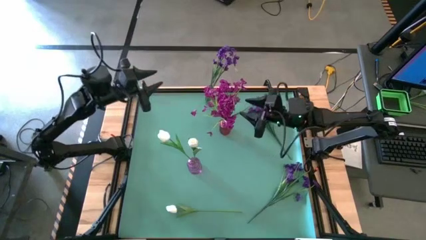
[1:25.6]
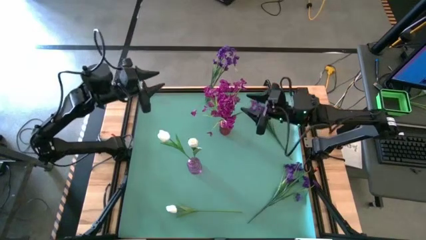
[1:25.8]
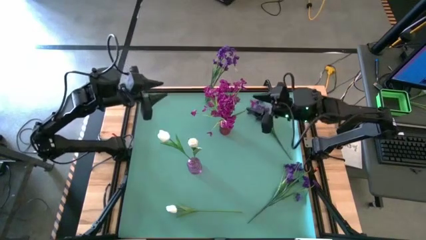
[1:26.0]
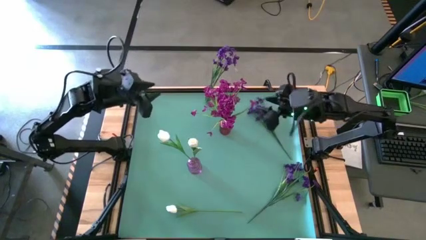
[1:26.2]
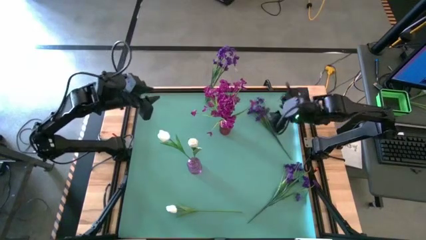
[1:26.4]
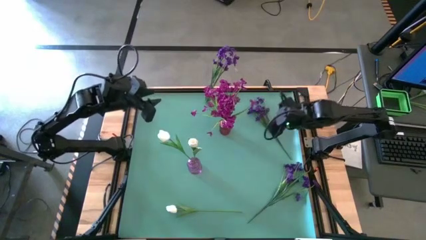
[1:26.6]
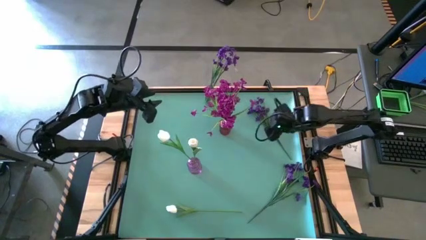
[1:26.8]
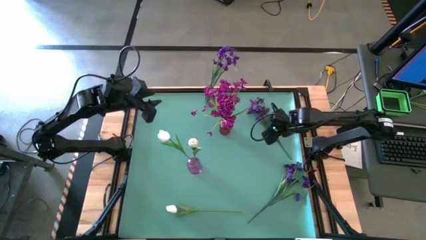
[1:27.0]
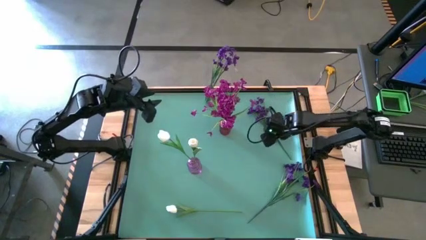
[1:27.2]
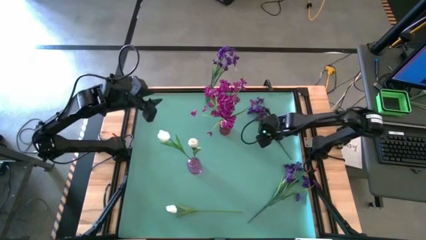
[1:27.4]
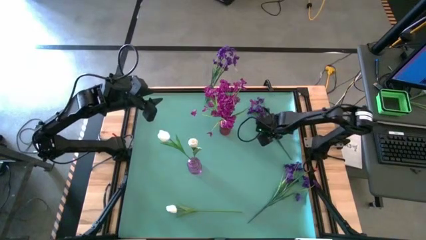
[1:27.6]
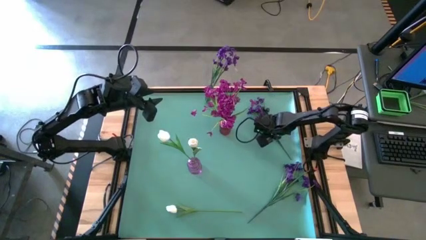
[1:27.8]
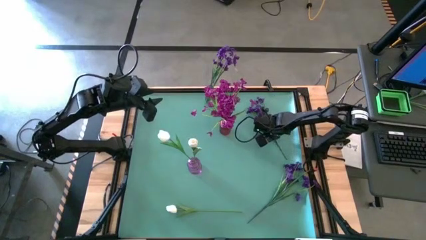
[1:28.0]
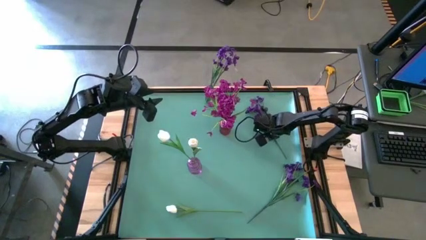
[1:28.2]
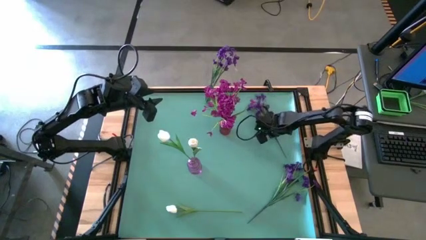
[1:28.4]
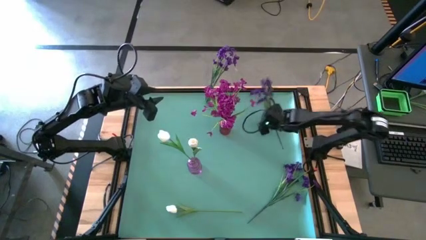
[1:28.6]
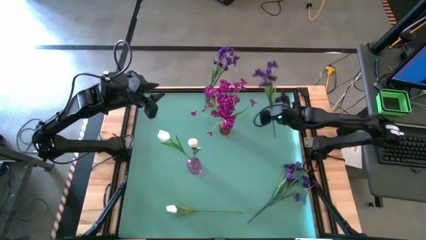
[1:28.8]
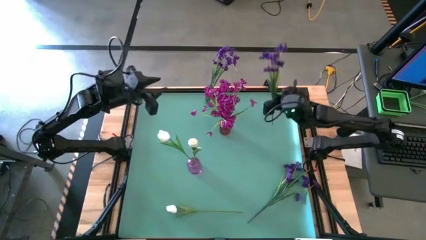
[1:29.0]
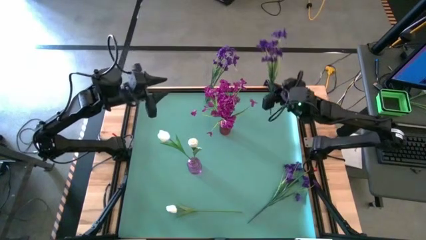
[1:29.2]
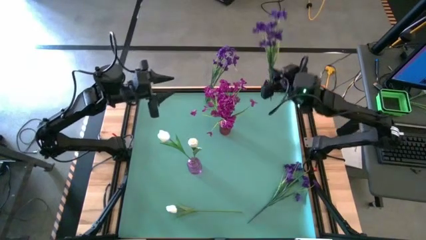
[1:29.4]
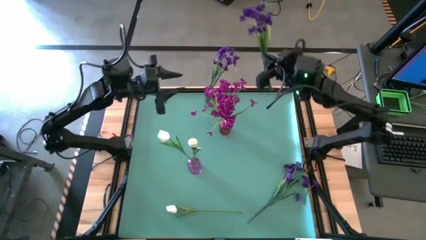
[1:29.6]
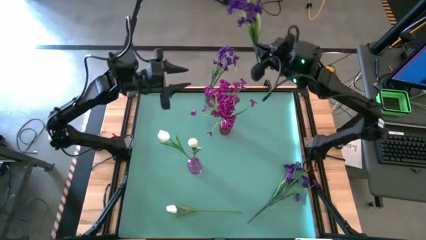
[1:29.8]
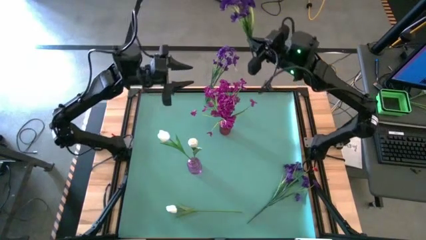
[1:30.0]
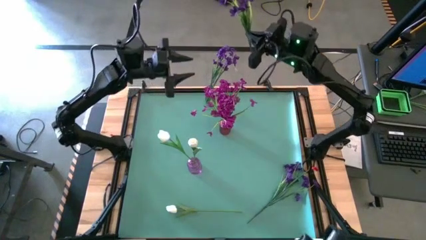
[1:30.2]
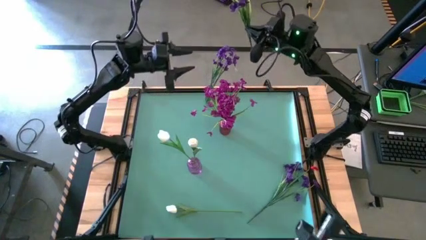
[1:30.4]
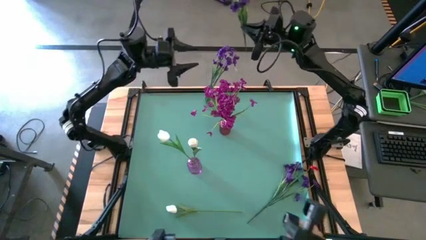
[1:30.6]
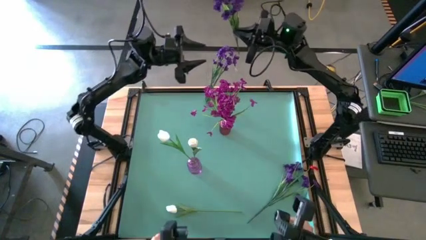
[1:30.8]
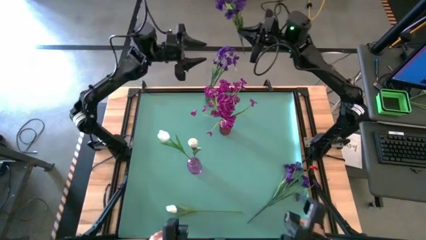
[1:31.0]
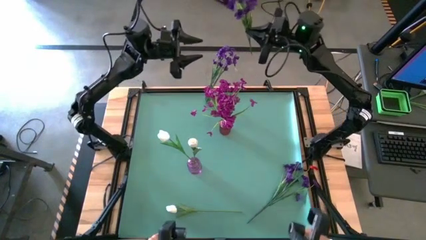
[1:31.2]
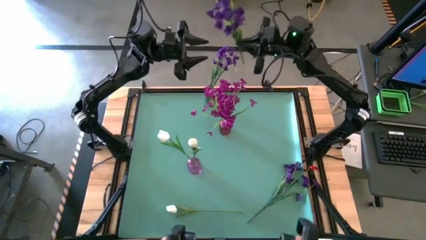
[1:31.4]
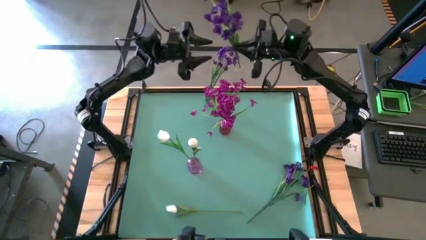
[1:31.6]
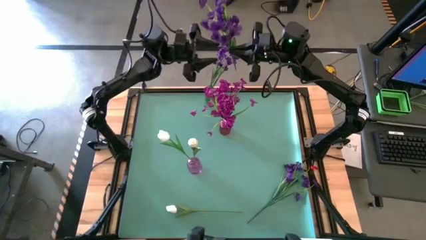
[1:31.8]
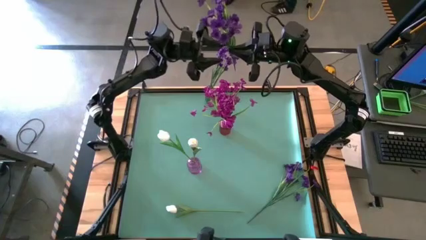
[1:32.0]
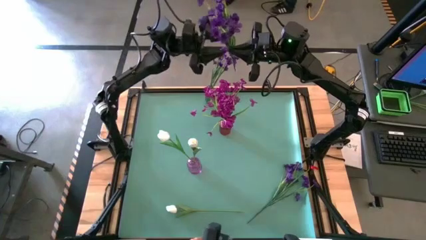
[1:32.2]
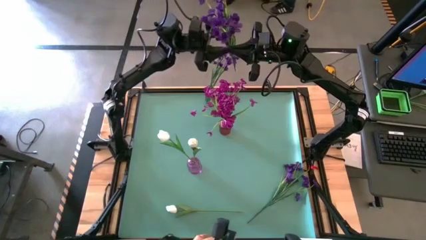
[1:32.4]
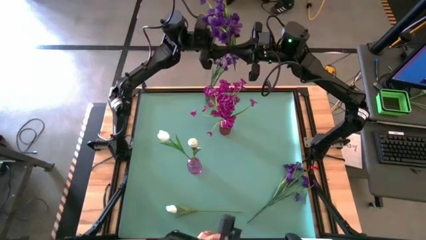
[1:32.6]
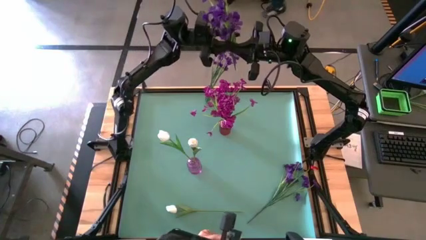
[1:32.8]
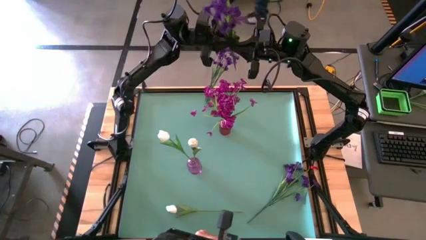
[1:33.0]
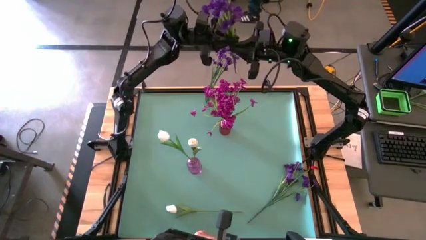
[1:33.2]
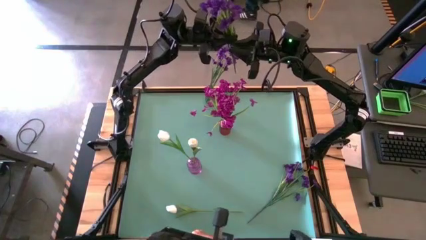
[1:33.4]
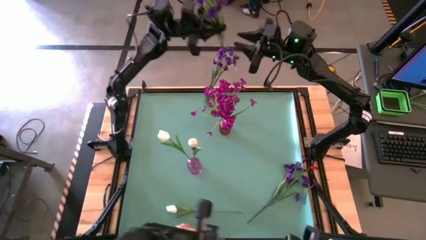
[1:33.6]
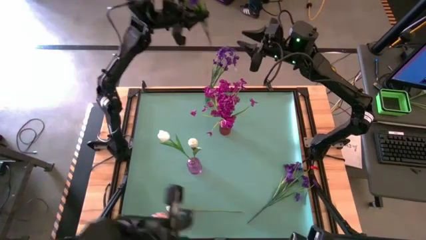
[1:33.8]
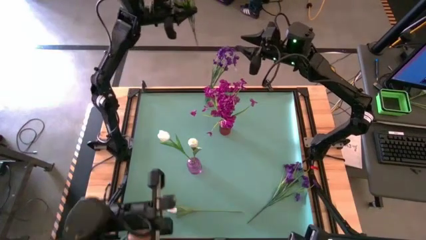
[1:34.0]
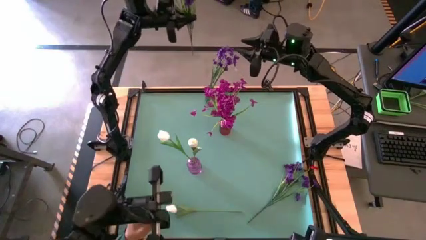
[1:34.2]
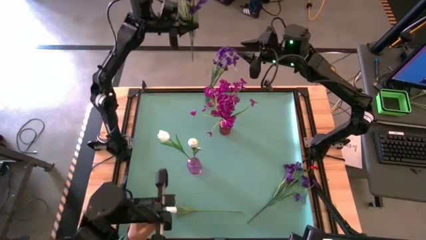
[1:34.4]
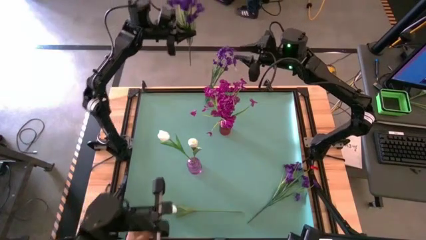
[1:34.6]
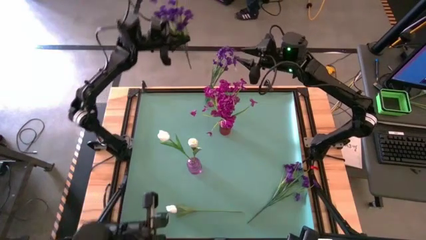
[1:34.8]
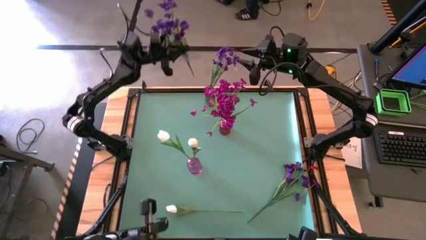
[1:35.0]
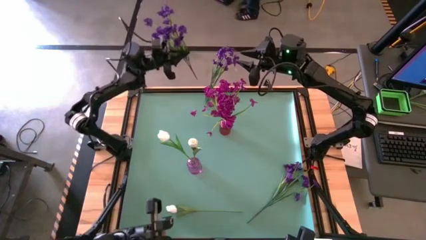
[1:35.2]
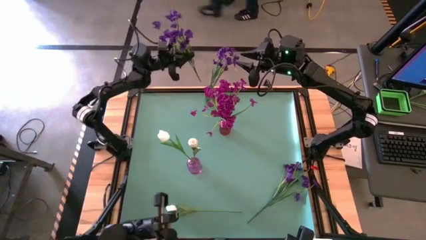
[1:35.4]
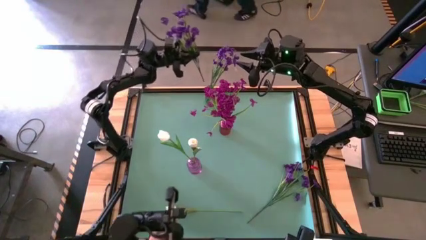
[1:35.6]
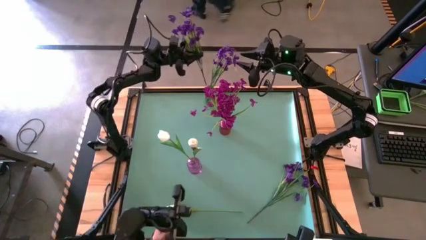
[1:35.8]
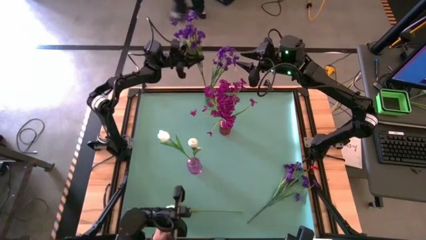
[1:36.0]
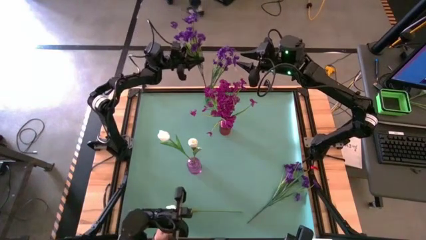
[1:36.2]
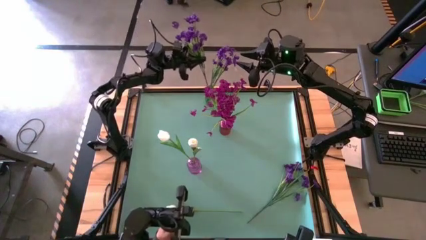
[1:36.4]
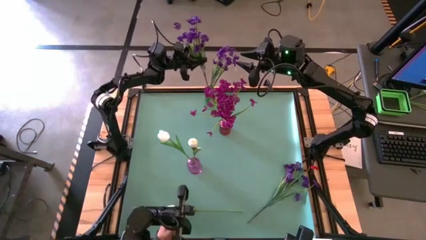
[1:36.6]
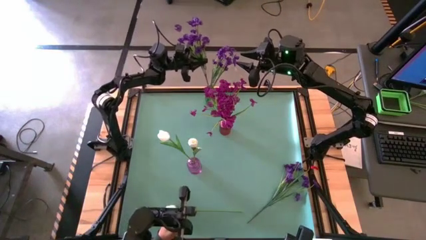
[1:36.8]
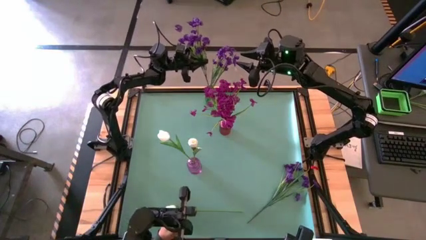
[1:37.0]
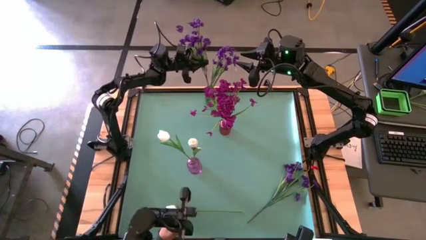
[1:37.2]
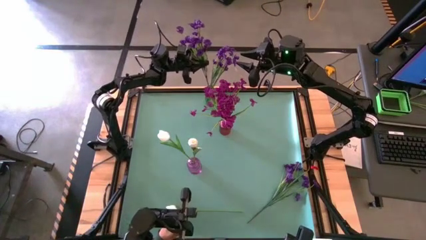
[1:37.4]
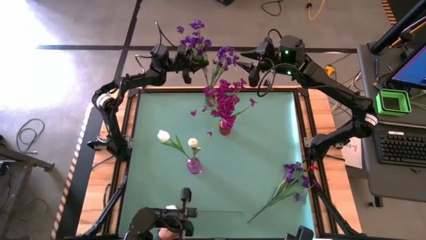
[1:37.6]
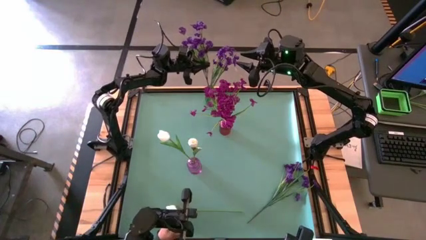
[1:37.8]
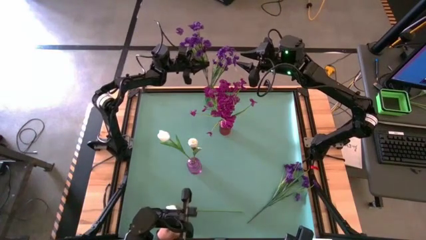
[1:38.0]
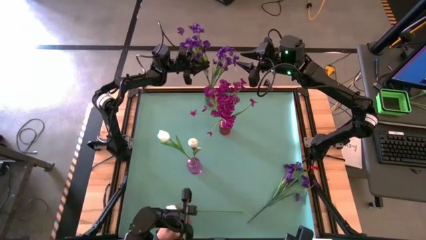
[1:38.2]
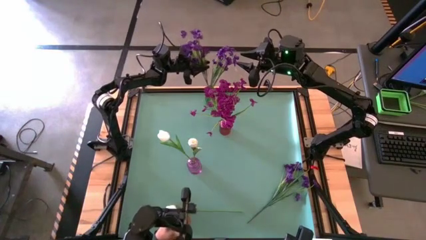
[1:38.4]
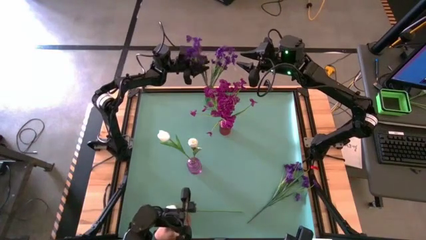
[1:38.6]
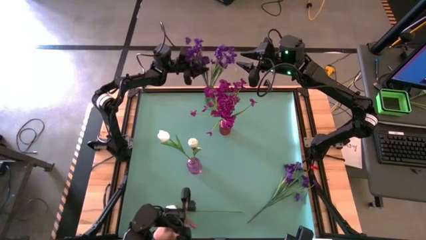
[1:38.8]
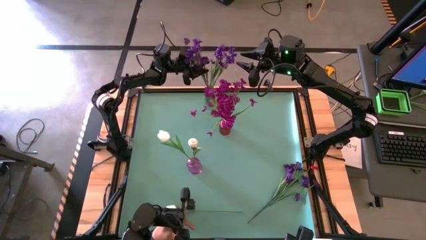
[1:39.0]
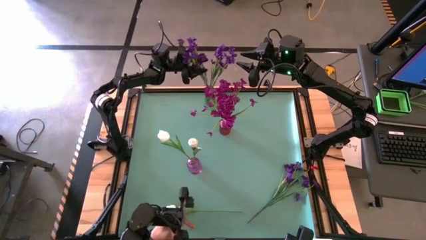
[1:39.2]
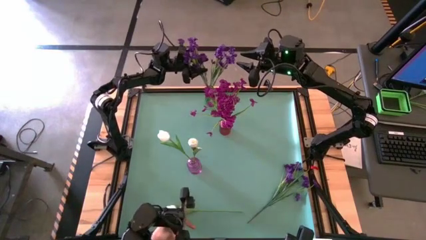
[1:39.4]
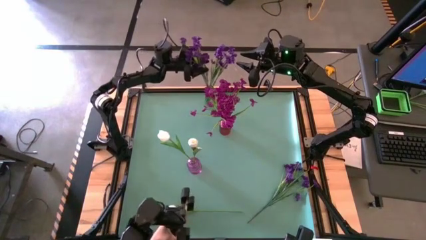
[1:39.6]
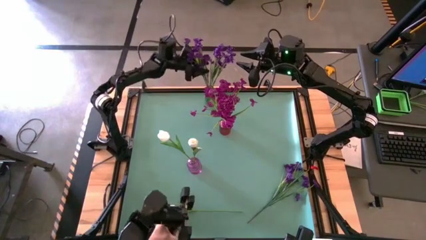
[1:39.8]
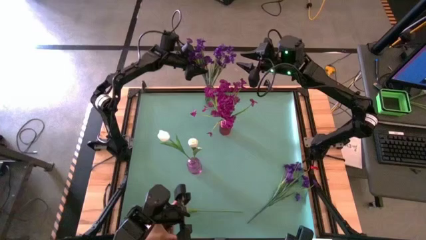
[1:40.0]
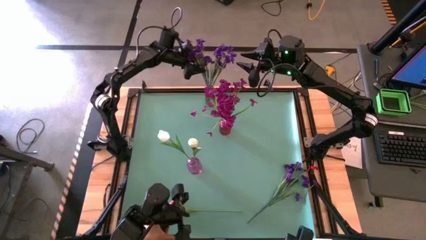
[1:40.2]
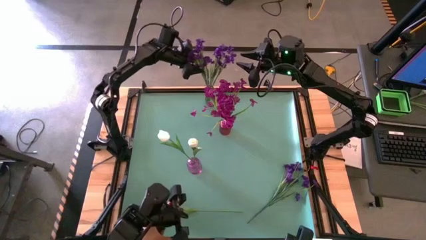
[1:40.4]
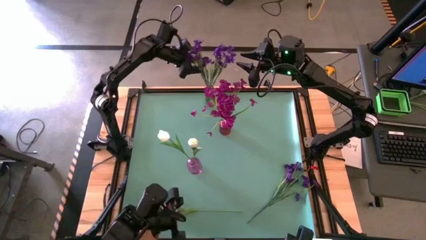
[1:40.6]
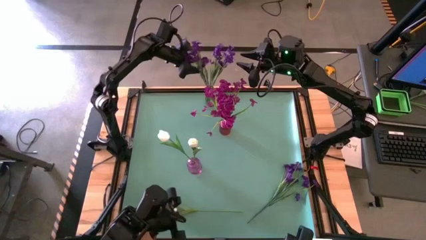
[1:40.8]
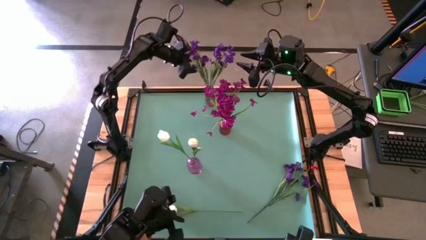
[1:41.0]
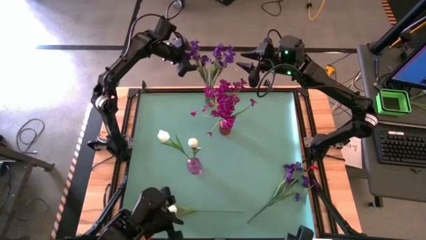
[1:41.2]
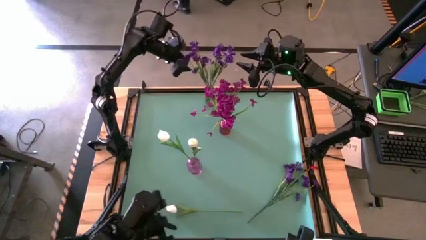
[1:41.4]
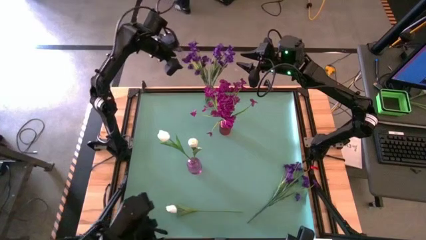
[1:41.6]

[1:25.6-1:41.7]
Task: Sort flowers into vase by color
Put the top purple flower into the green vase
